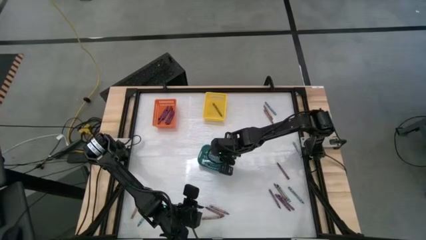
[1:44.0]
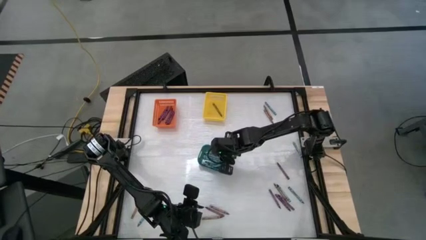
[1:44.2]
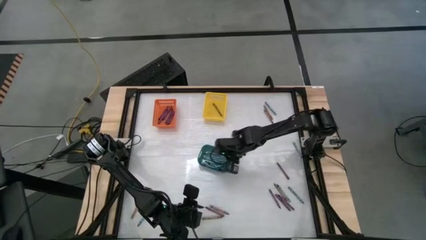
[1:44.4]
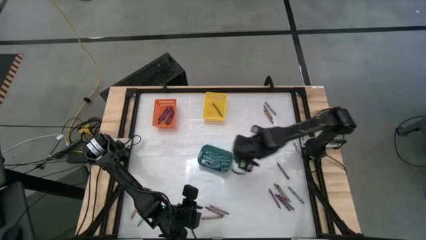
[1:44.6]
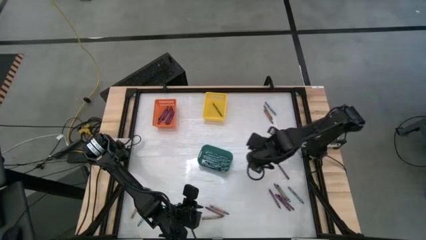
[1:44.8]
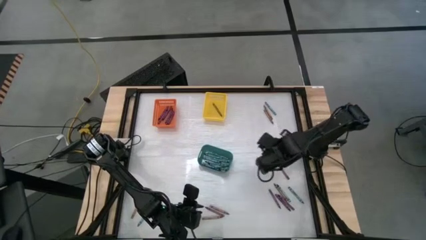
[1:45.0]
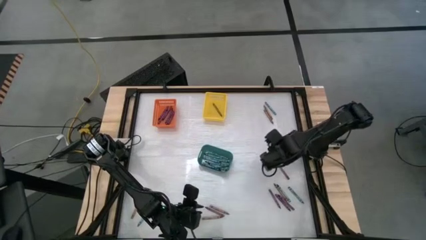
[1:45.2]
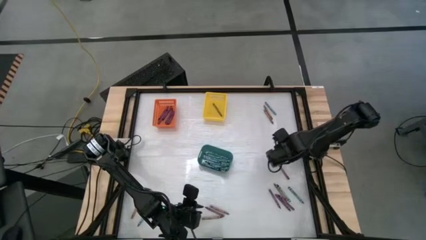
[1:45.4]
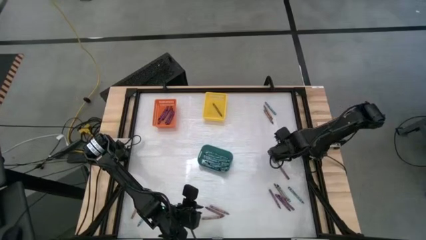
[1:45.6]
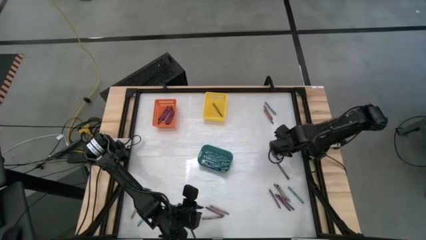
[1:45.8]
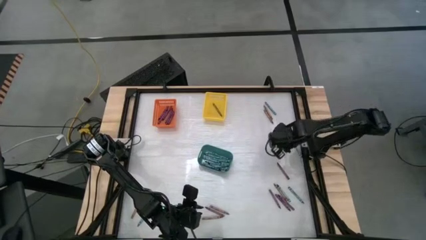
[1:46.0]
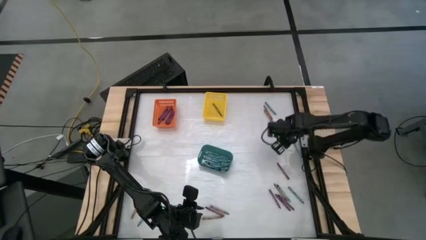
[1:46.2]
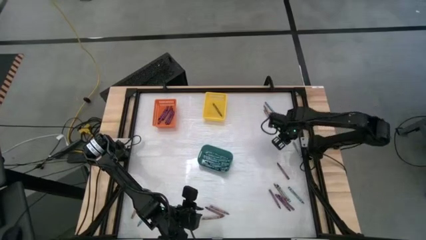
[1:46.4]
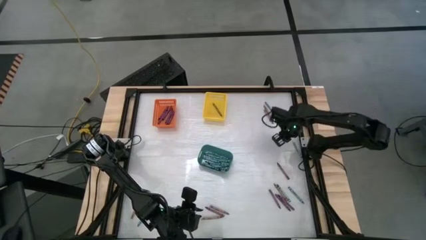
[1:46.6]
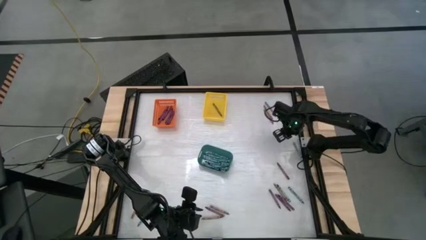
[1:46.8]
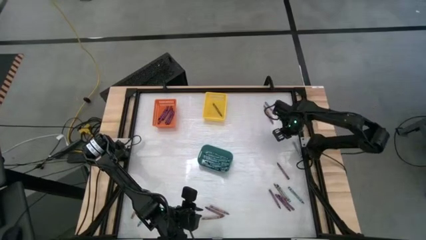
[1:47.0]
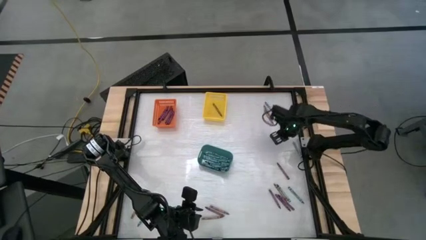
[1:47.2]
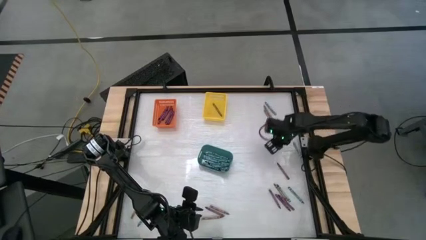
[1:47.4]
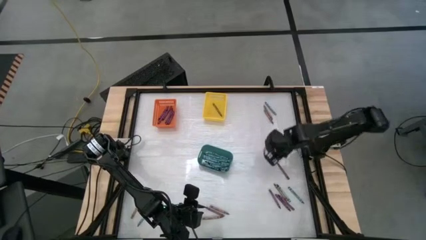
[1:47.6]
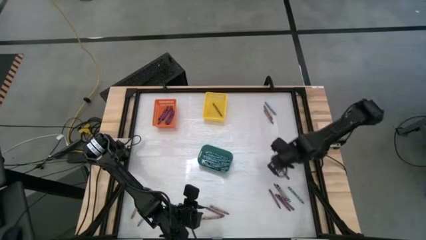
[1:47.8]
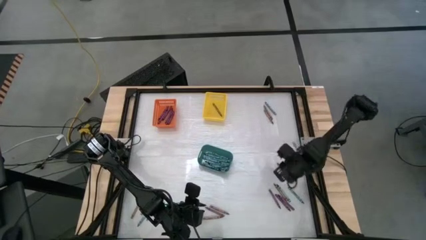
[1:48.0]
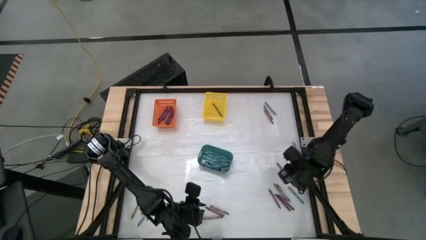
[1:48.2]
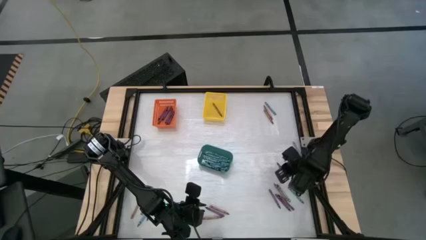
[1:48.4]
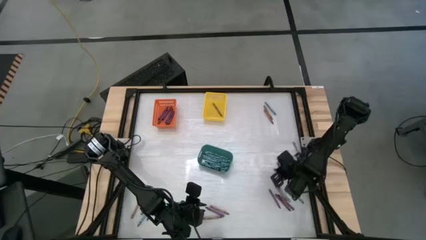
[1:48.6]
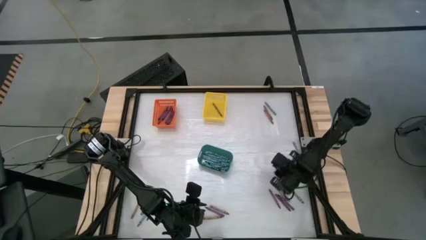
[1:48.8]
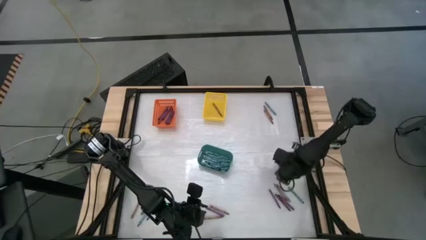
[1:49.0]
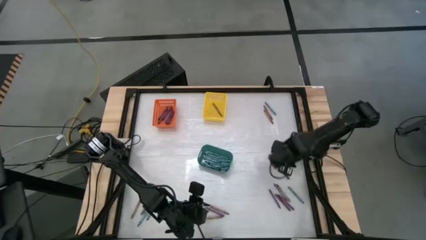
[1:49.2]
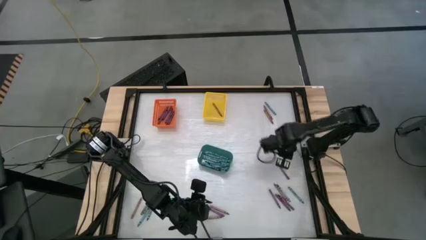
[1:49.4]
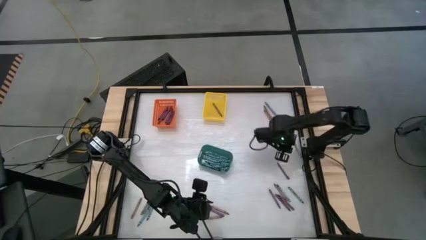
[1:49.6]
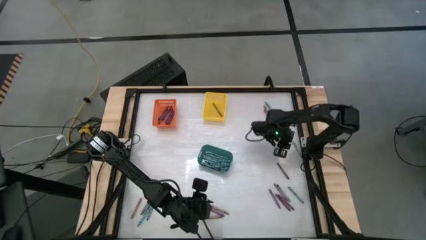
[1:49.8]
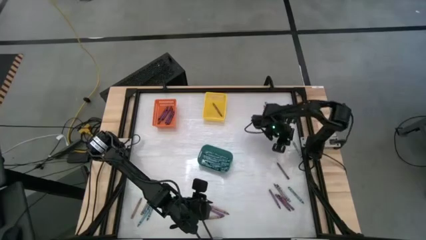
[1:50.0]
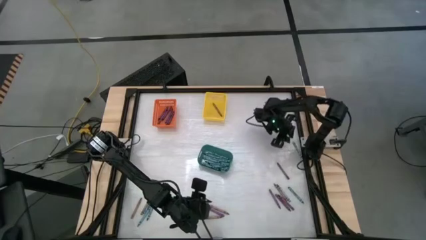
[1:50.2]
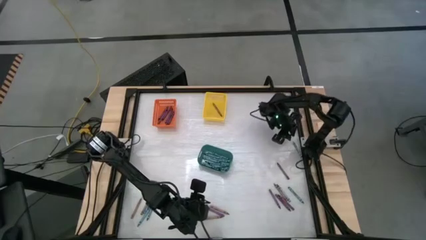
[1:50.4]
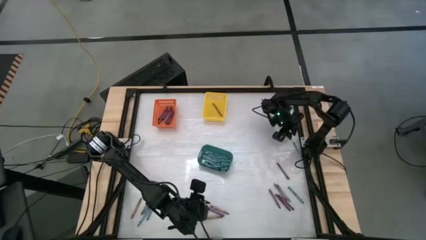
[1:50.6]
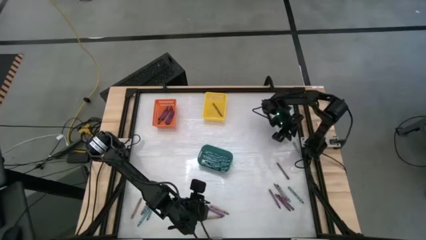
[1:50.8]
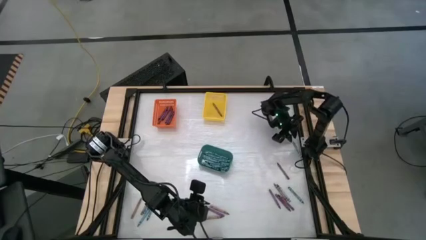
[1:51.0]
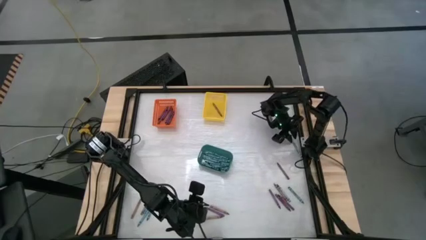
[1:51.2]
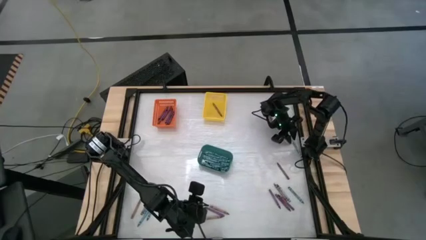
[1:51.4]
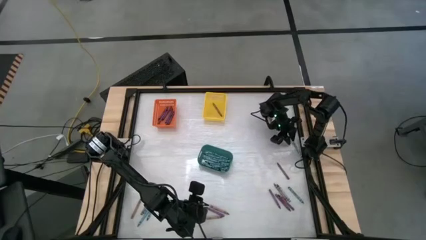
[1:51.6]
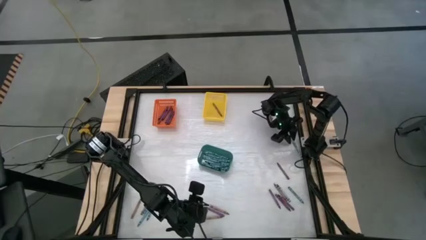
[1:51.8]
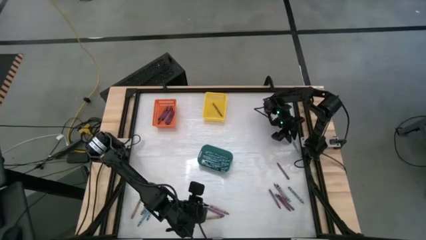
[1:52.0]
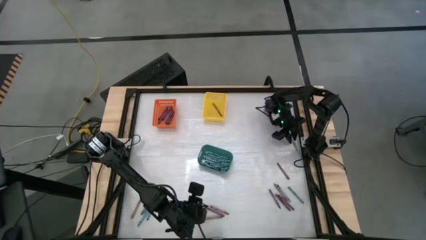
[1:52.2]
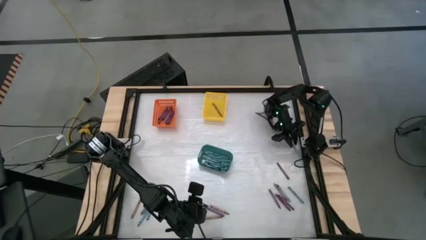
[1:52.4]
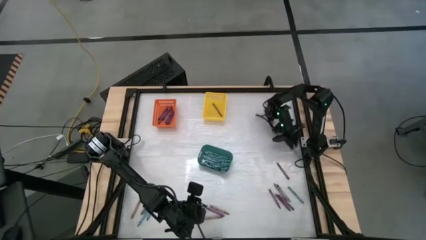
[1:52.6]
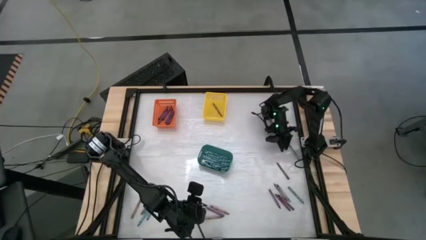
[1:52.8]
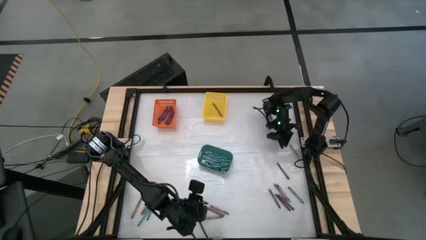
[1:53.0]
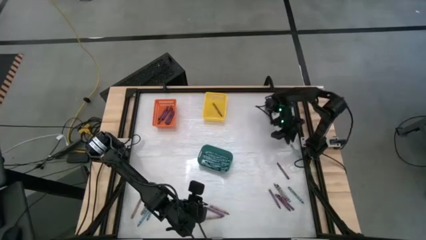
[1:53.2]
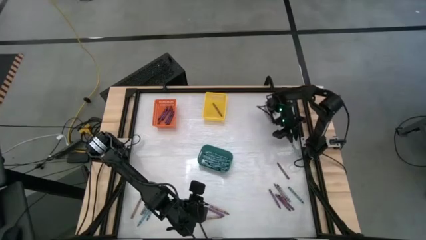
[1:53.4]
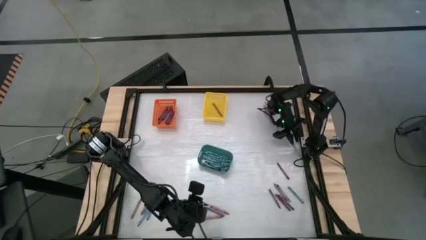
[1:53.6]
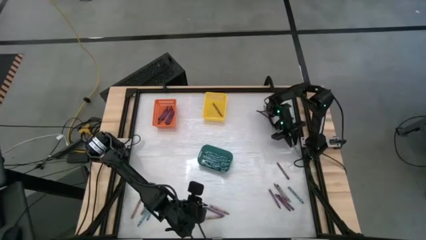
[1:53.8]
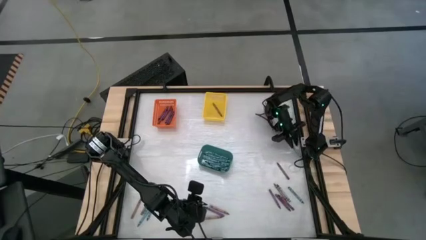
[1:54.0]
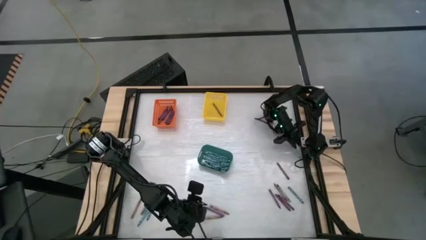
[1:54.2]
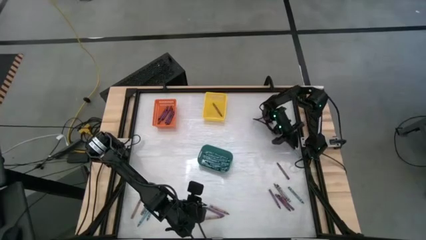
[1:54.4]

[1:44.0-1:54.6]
Task: Sort crayons
Put the blue crayon into the blue bin

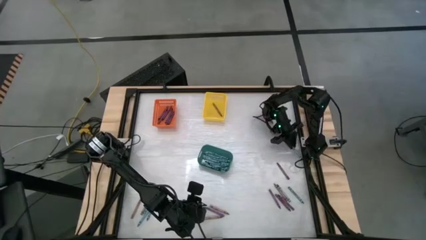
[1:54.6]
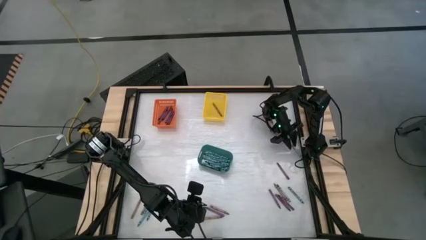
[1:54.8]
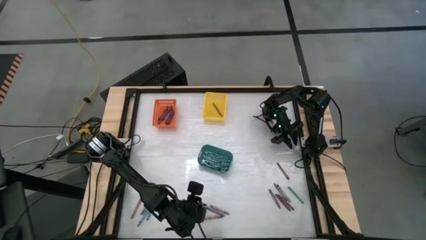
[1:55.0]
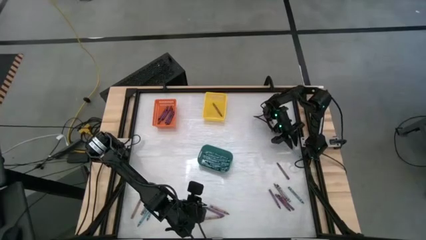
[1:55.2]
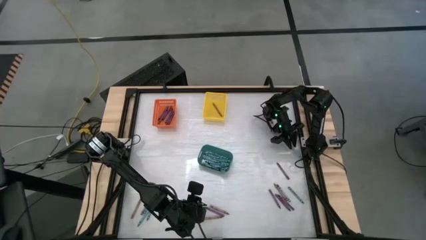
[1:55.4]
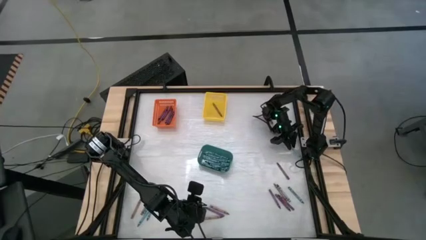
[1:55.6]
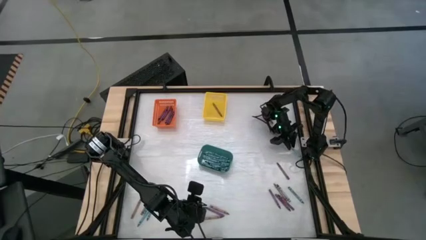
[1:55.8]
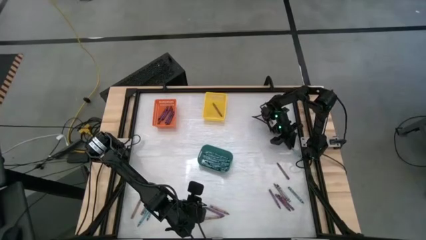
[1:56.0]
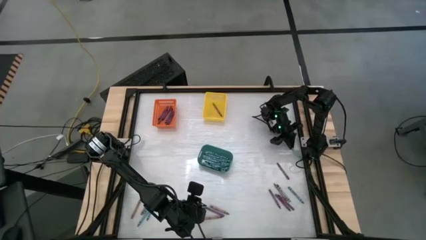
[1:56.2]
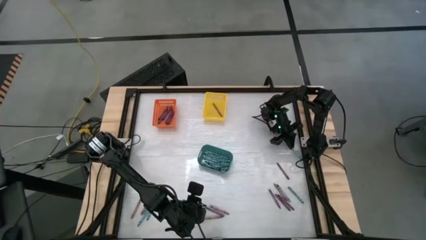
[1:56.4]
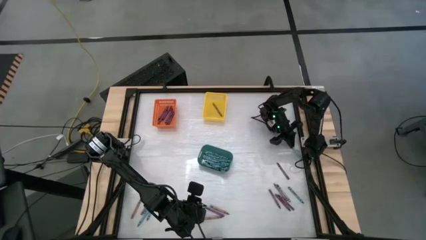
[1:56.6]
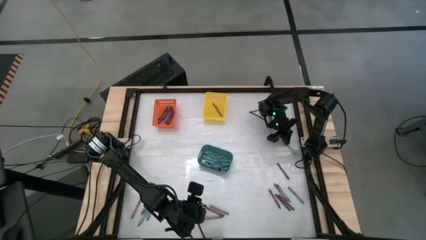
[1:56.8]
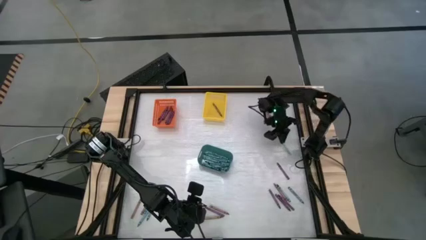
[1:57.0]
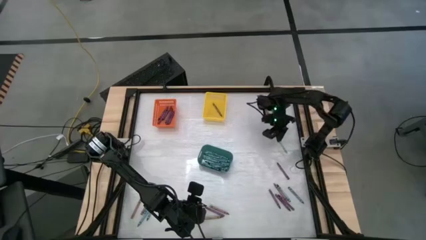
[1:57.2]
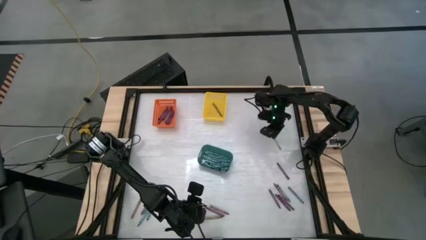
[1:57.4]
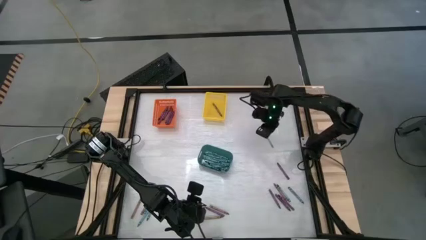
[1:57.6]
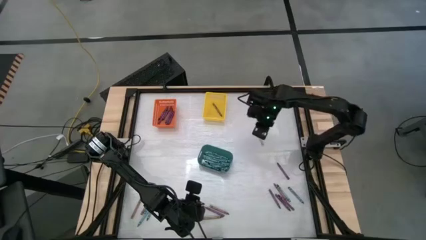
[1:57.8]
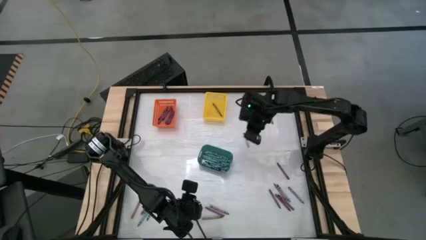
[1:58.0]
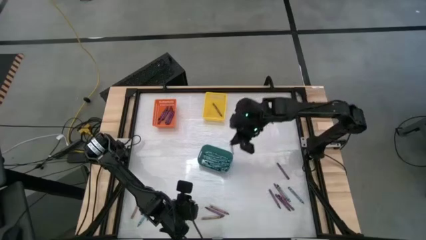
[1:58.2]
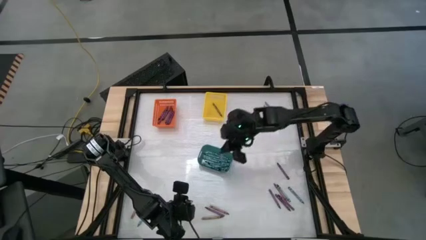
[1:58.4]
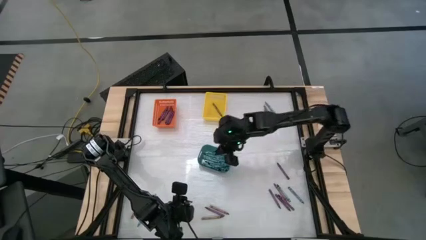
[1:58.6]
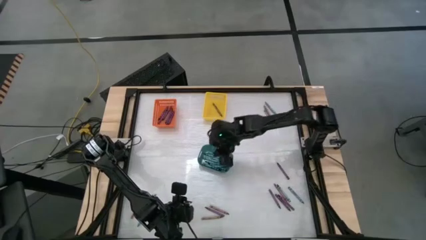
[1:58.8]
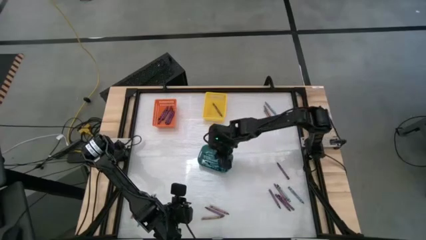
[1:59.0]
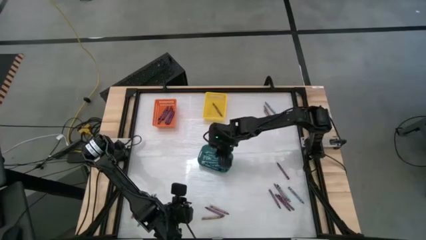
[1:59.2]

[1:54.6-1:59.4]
Put the blue crayon into the blue bin

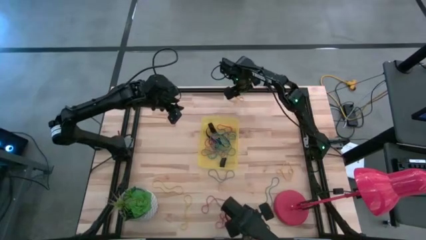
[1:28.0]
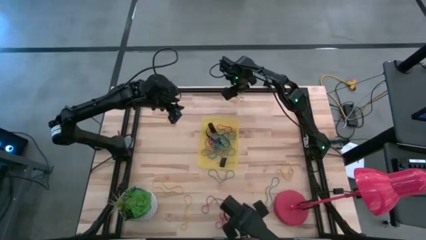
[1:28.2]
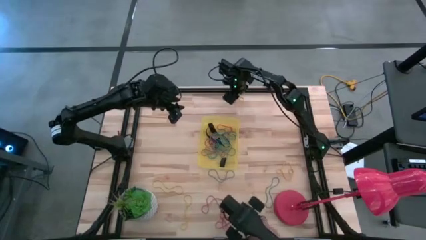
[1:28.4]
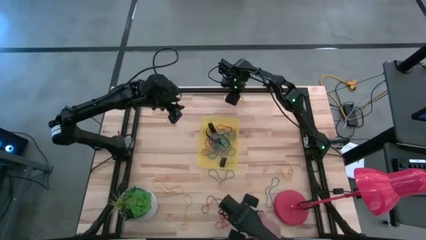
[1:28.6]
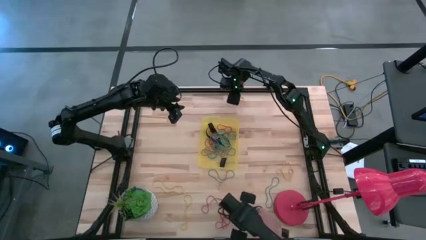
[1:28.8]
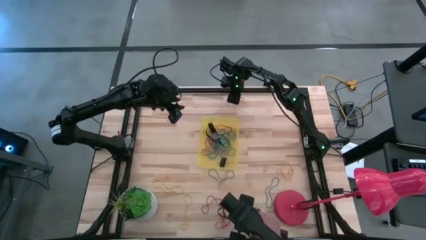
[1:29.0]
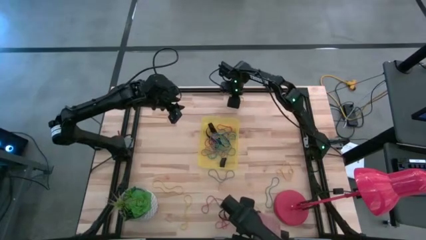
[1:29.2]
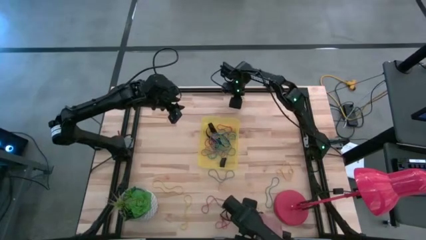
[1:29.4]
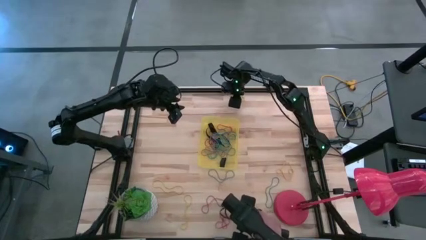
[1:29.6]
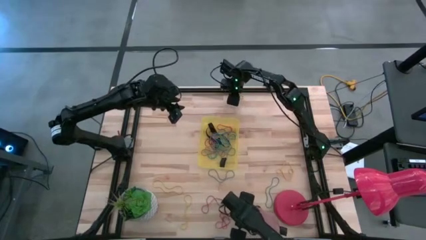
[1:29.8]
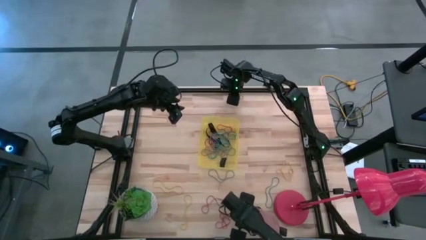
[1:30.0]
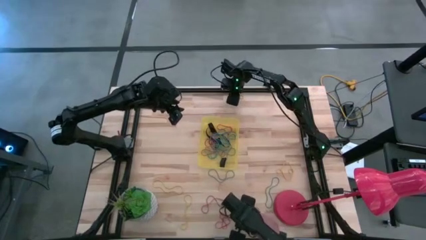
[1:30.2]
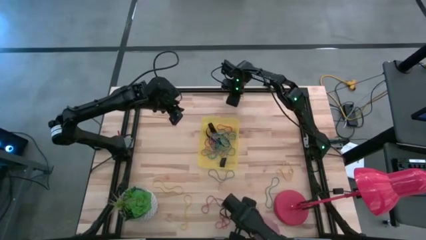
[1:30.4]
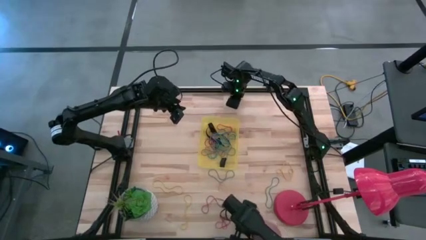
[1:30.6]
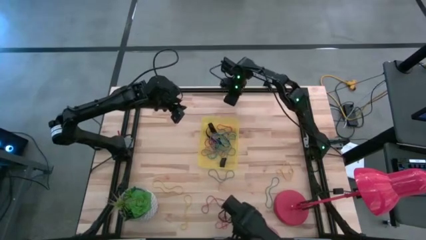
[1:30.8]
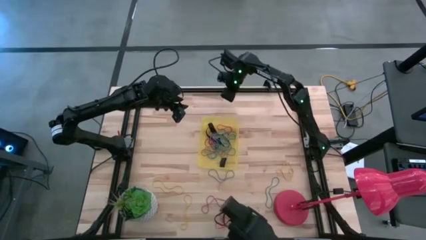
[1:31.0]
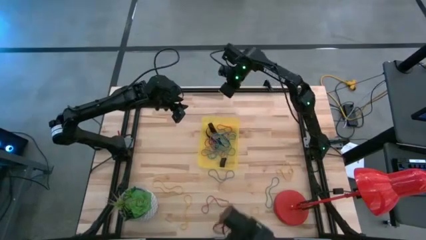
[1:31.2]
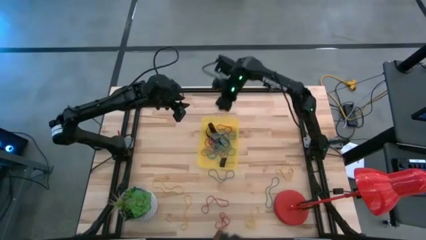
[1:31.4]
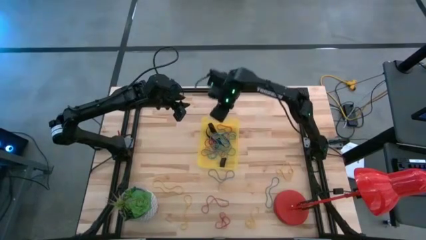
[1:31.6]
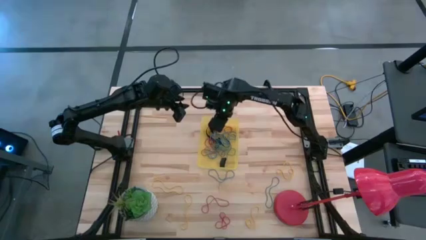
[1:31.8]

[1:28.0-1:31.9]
Task: Pick and place rubber bands into bin
Put the yellow rubber band into the yellow bin
